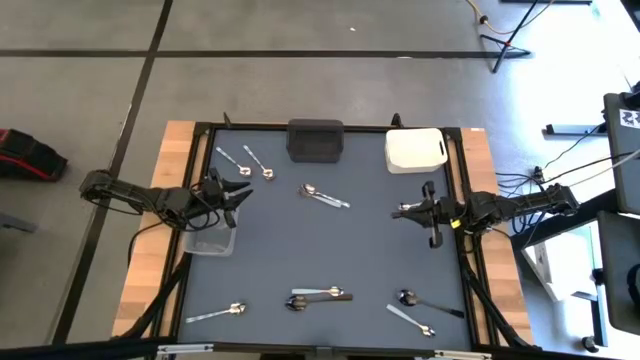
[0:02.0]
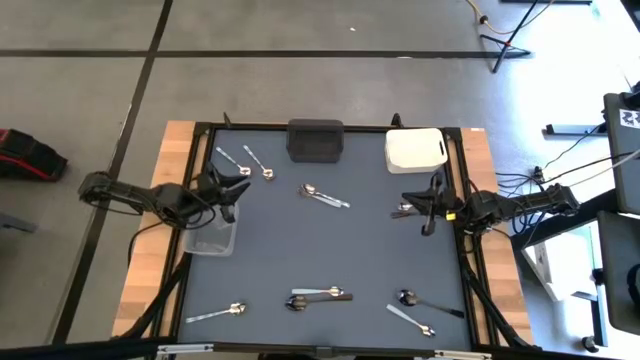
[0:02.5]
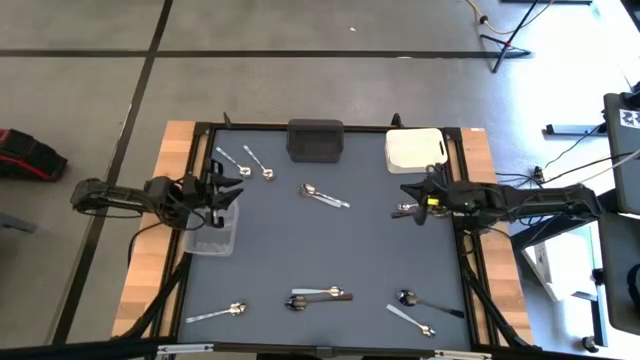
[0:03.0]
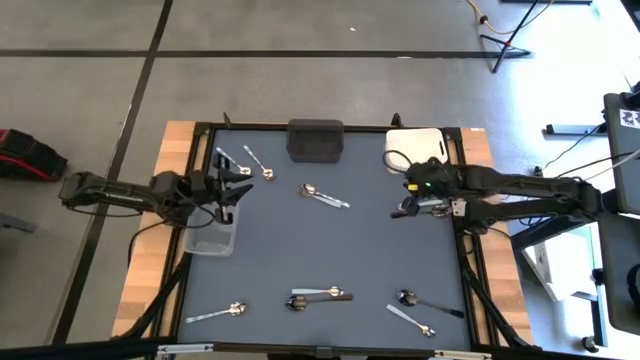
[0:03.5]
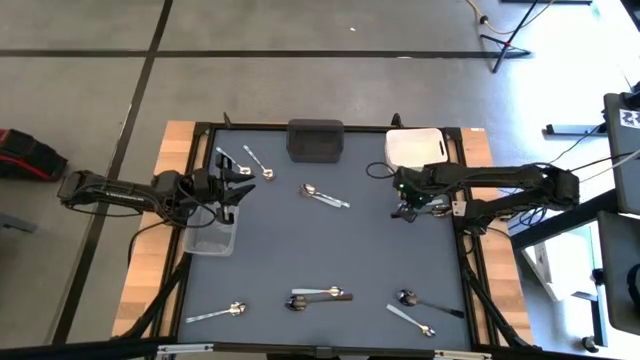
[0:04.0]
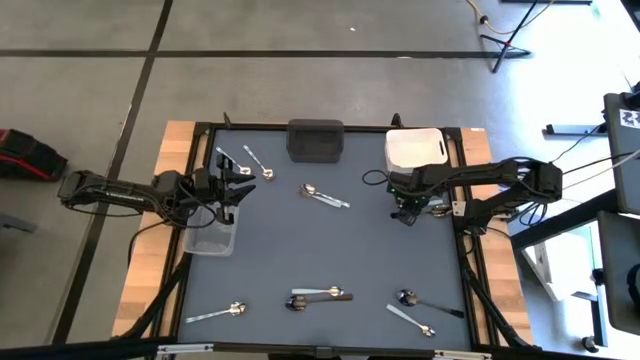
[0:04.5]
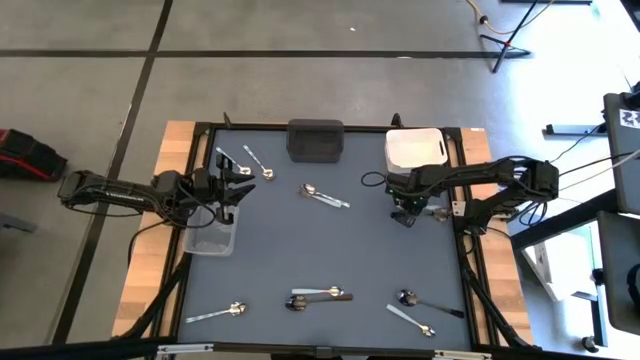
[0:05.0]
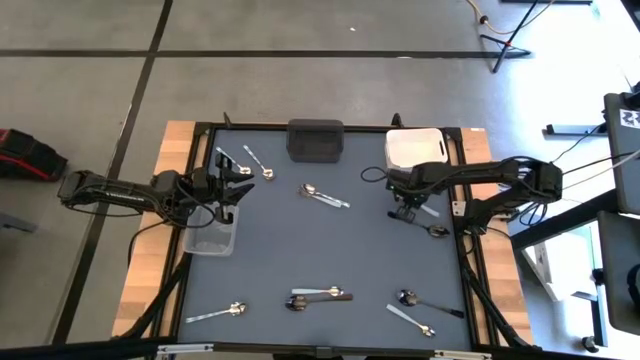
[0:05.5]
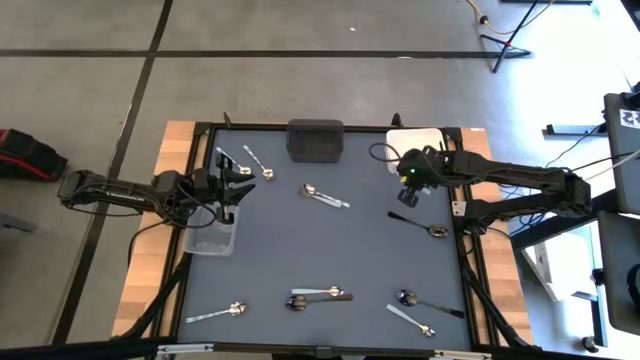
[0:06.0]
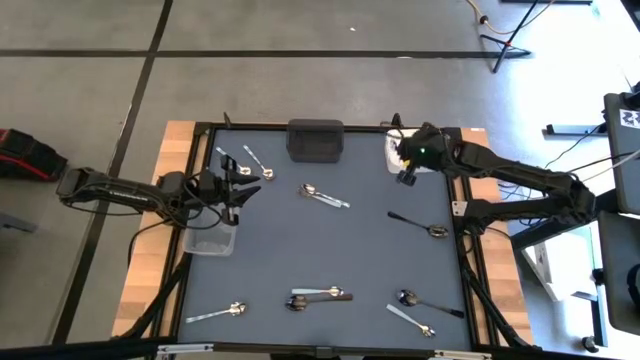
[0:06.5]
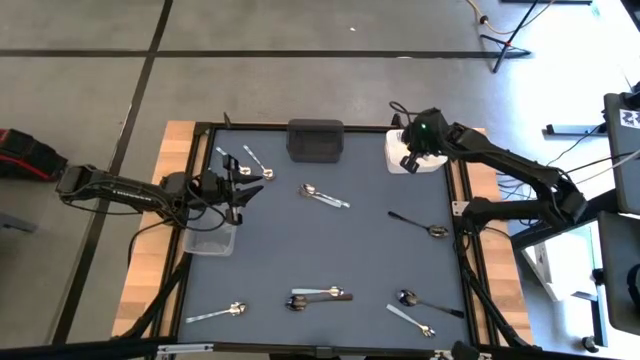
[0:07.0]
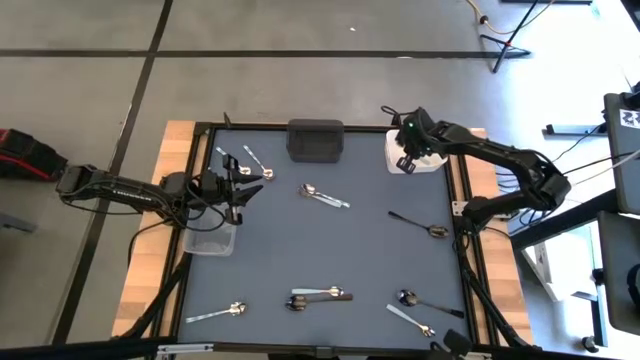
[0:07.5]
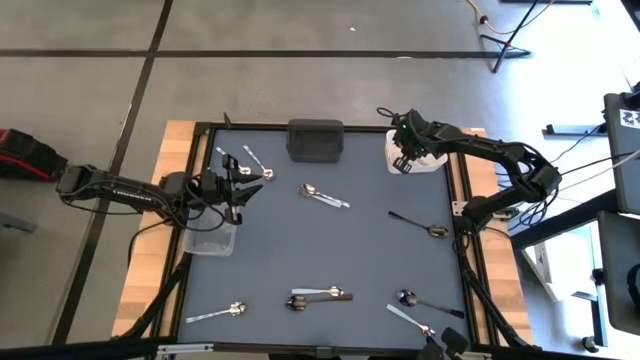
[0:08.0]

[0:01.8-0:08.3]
Task: Sort silverware by color (type)
Put the top right light blue spoon into the white bin

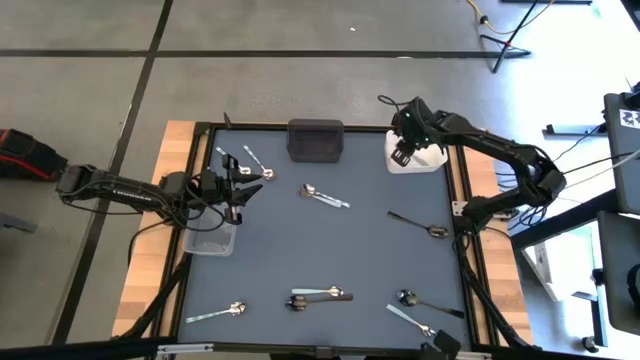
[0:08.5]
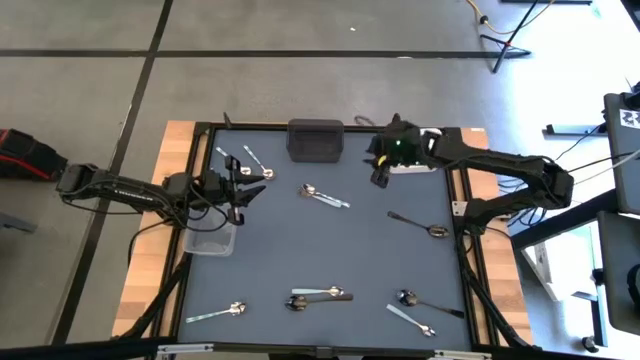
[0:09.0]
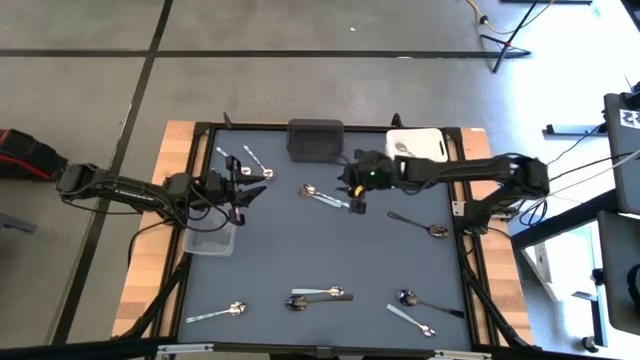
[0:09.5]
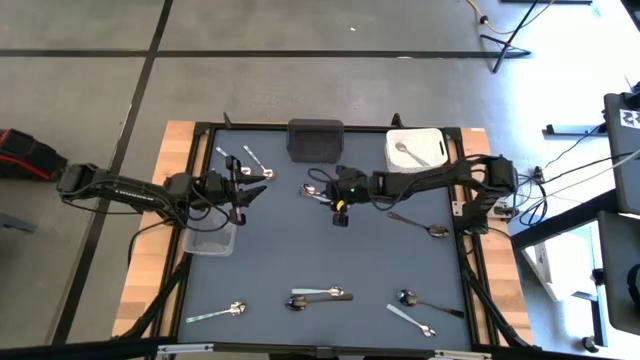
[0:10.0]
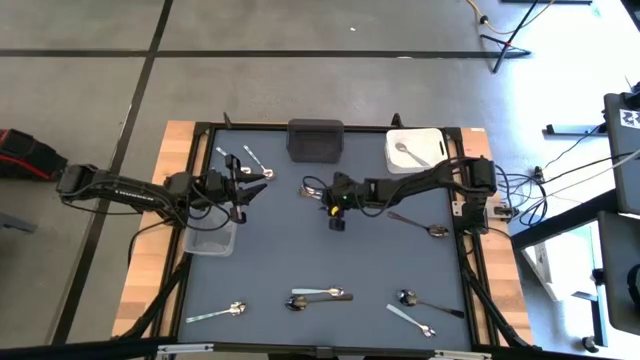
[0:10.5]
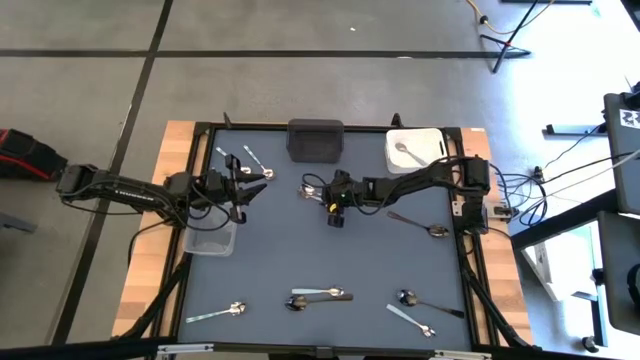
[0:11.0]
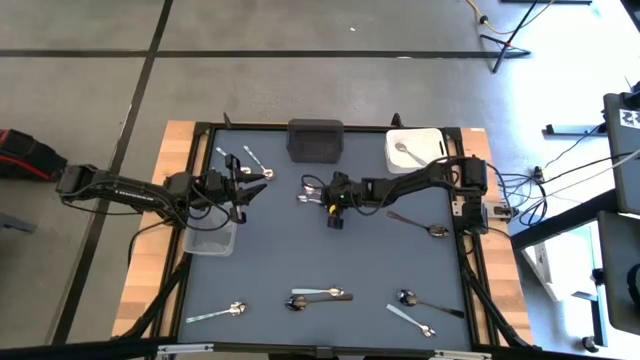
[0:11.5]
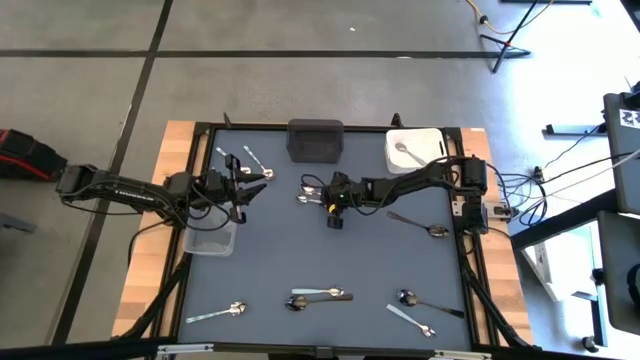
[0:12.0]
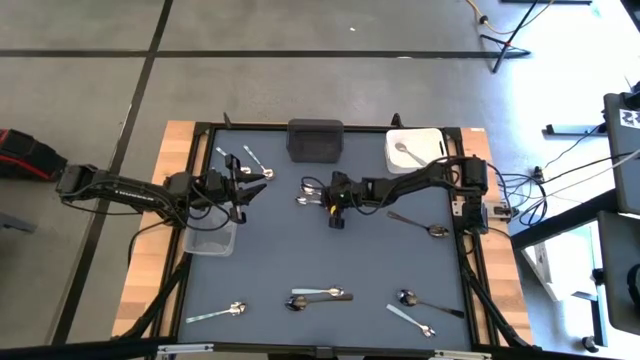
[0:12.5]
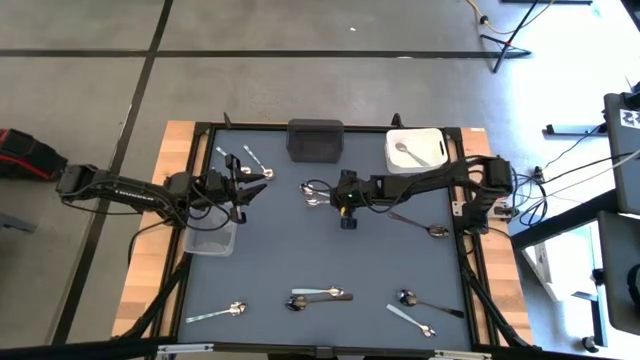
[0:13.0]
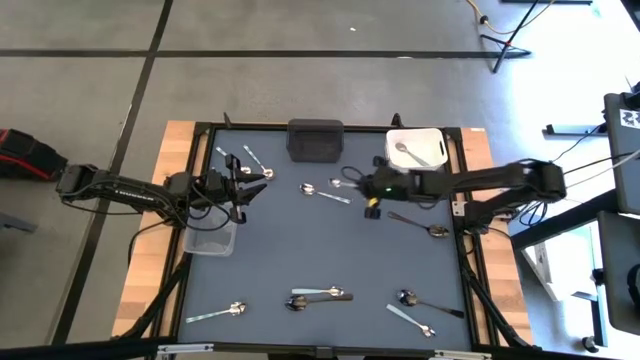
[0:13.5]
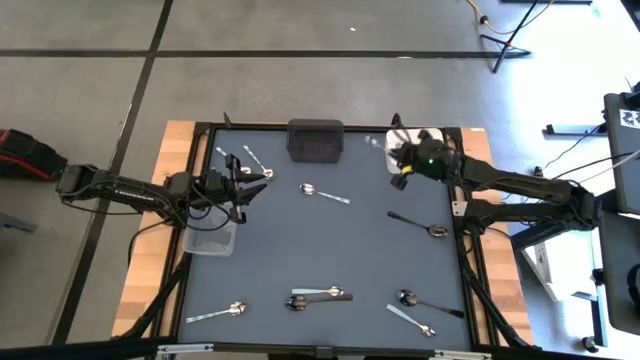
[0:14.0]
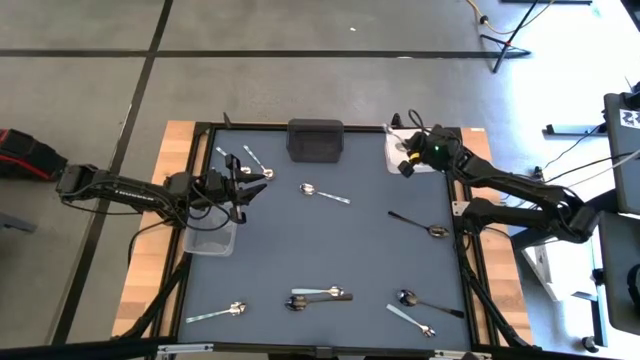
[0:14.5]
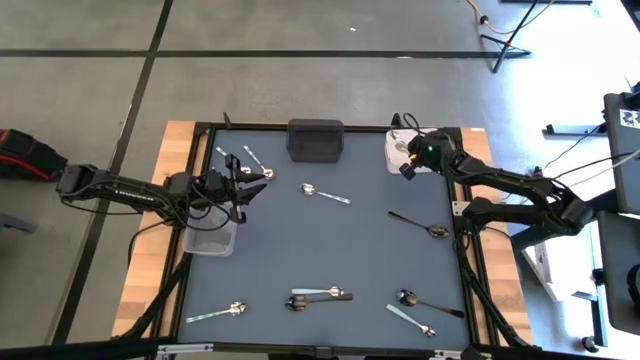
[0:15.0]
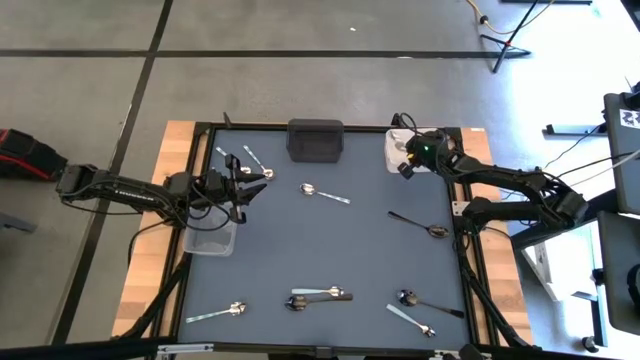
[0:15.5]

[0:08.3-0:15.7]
Put the top light blue spoon into the white bin

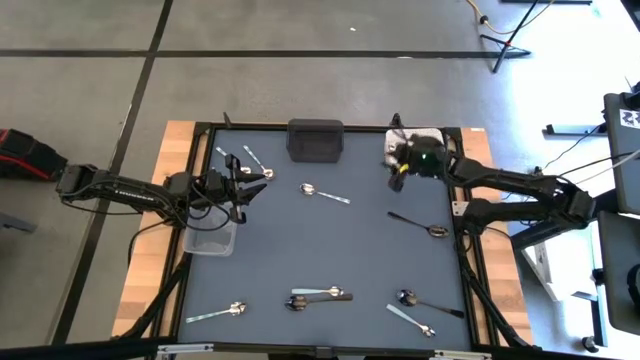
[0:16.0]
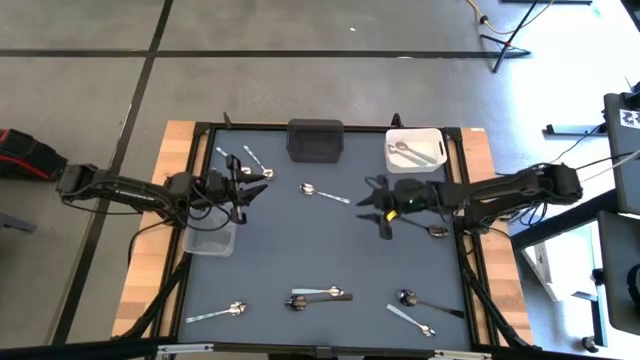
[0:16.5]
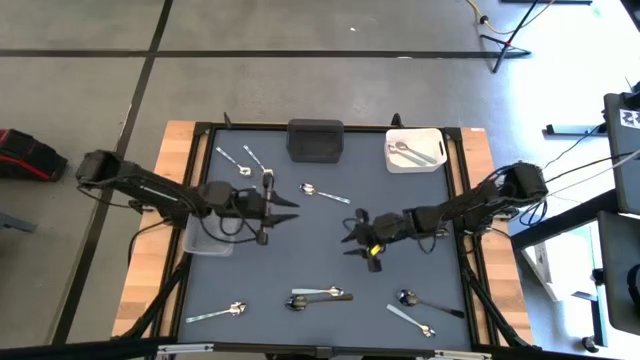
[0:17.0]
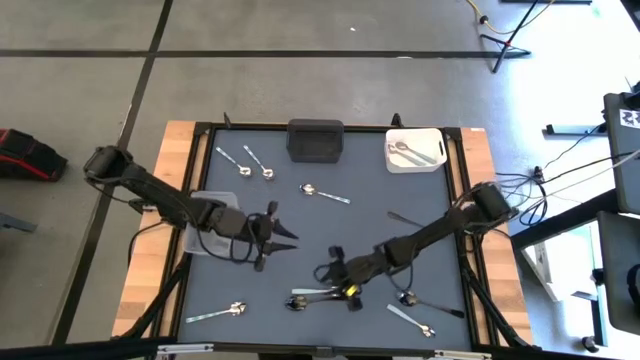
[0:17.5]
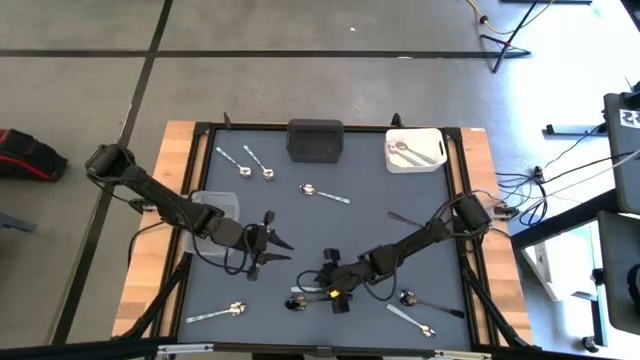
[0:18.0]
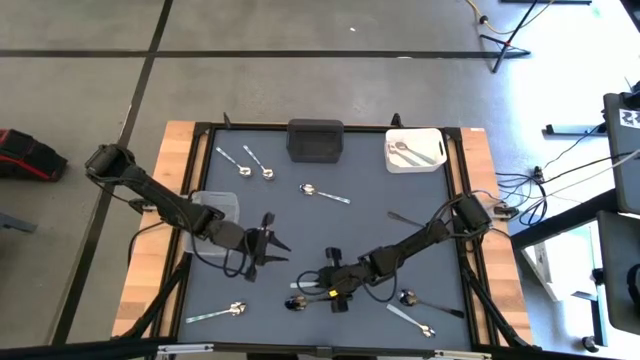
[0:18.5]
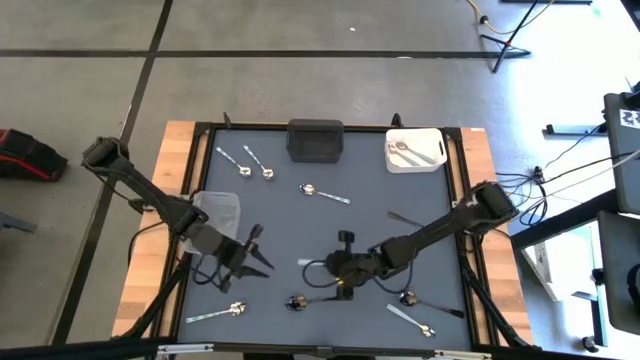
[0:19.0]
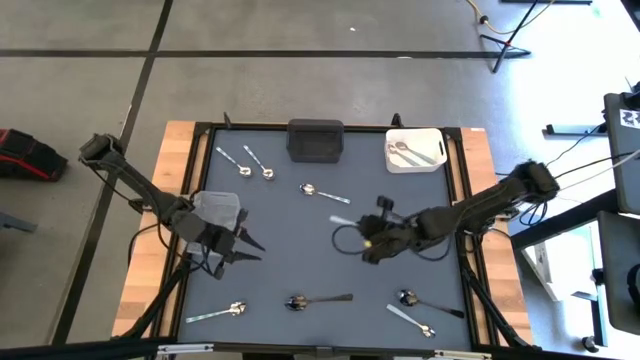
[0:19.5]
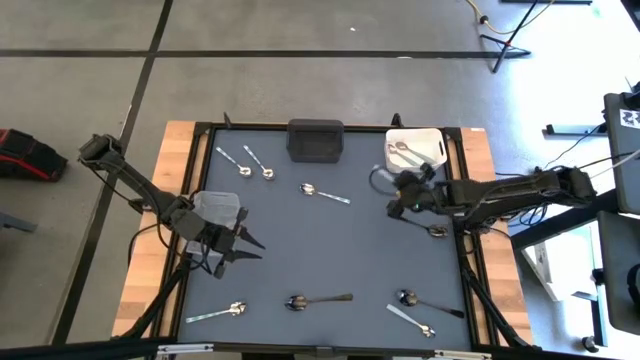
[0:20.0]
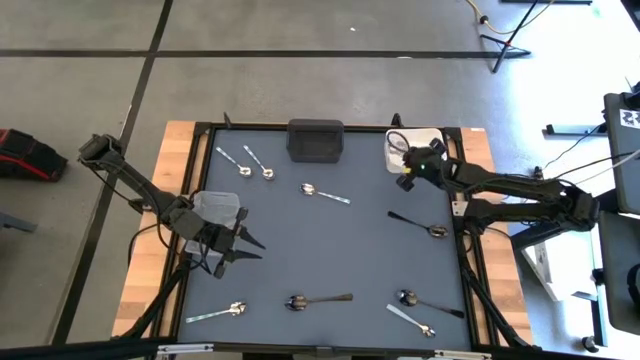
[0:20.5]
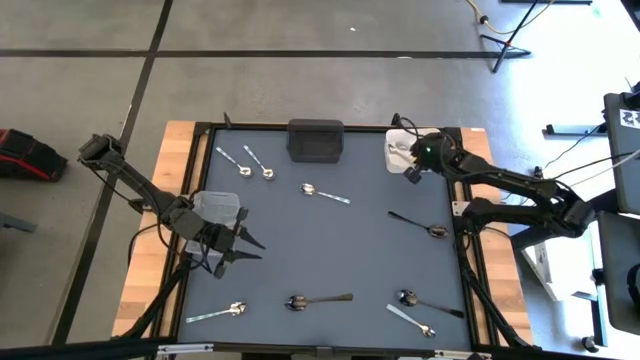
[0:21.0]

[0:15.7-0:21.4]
Put the left light blue spoon into the white bin

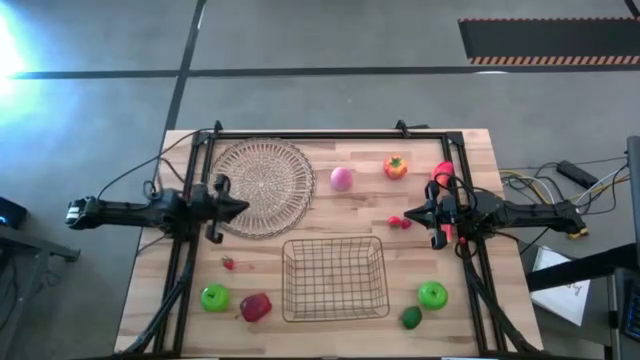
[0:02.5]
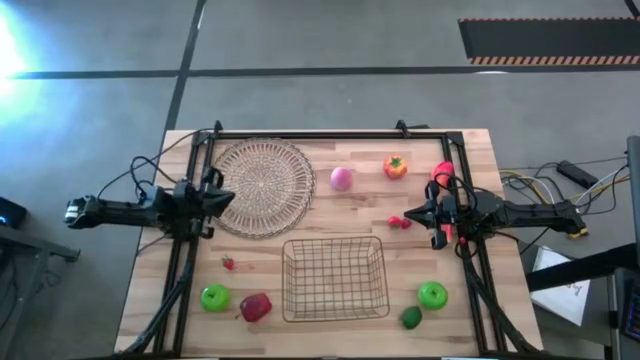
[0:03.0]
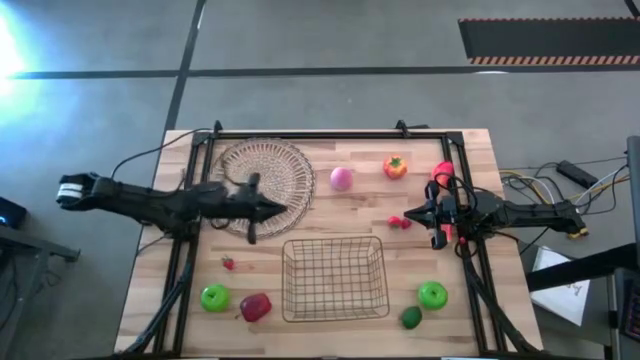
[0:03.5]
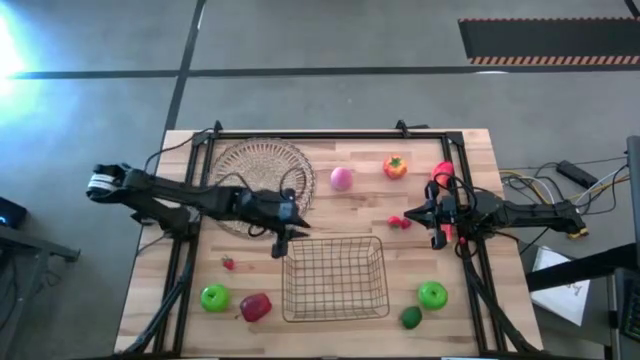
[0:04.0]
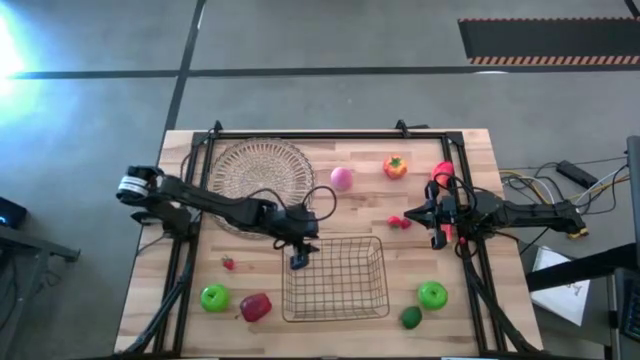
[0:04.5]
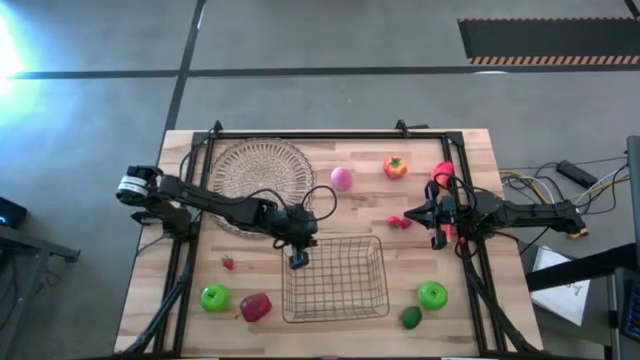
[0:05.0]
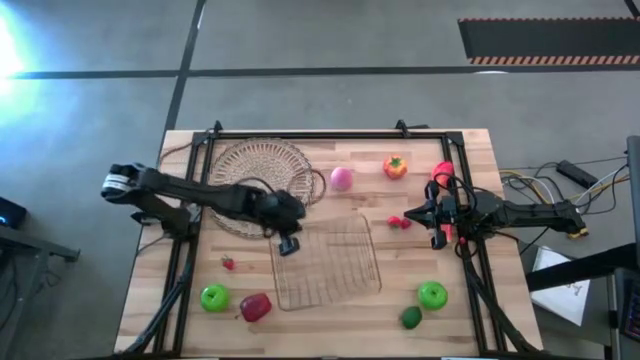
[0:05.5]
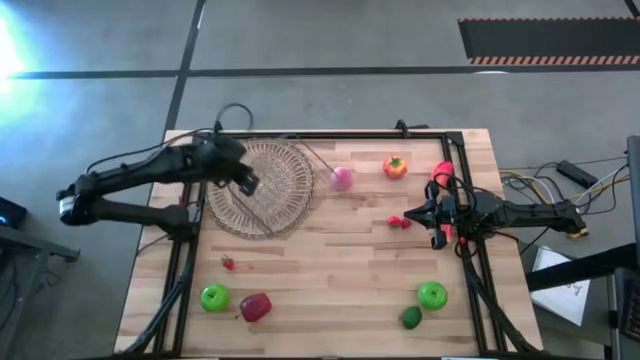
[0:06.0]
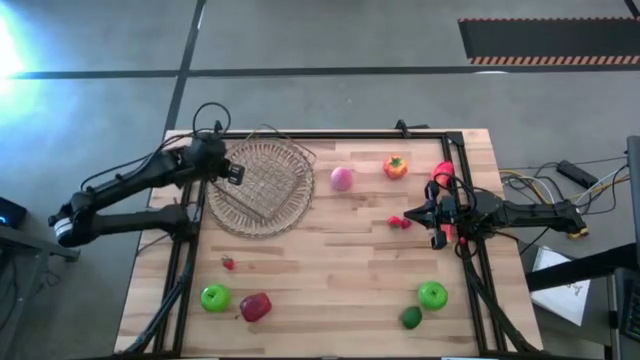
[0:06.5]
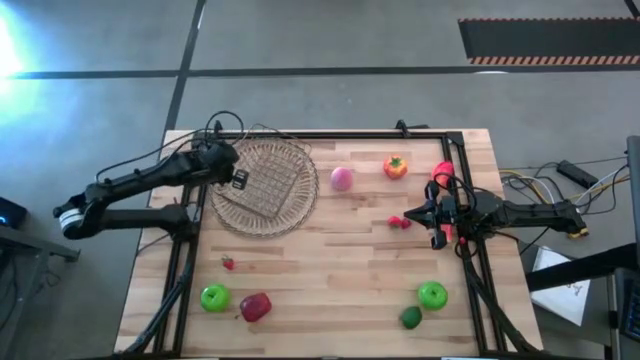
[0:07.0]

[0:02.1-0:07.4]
Task: Build produce basket
Put the basket on the table mat
